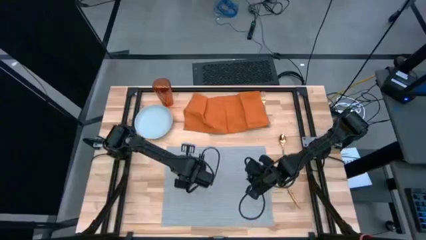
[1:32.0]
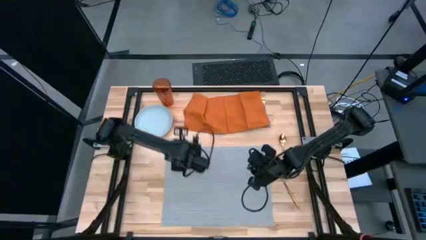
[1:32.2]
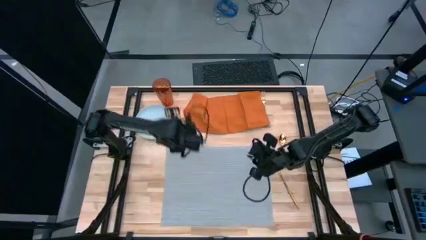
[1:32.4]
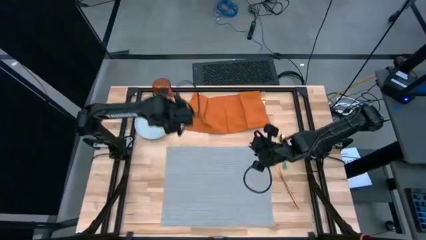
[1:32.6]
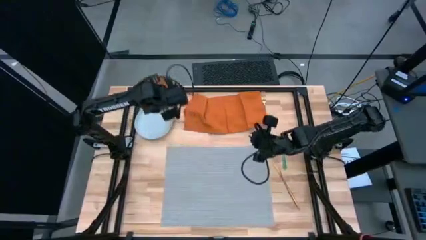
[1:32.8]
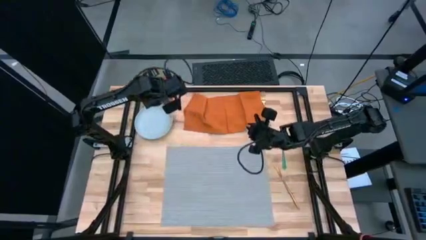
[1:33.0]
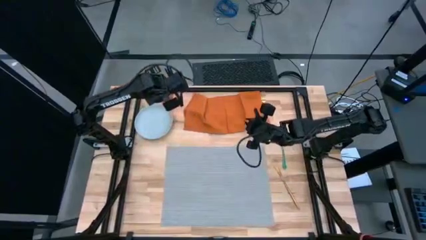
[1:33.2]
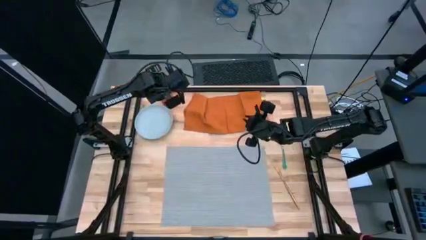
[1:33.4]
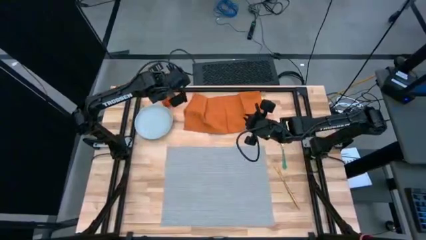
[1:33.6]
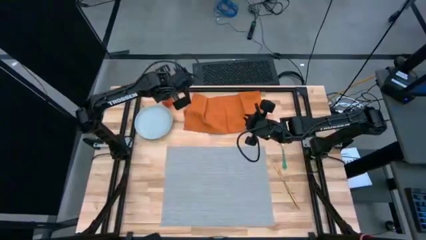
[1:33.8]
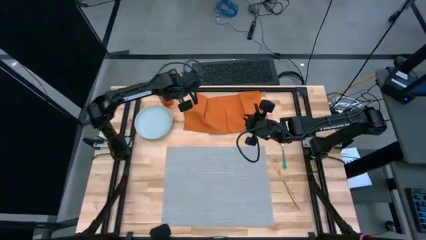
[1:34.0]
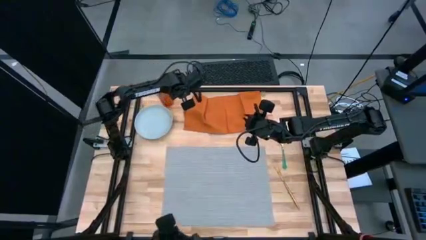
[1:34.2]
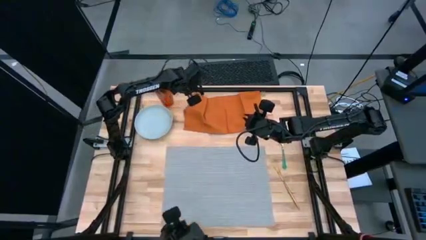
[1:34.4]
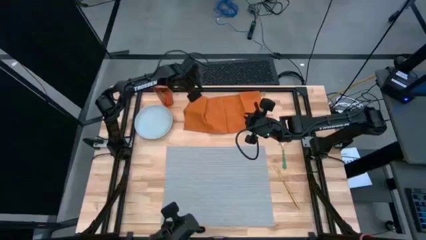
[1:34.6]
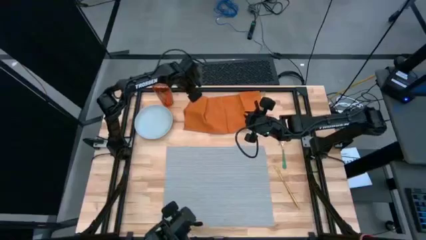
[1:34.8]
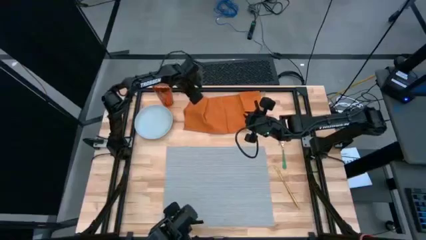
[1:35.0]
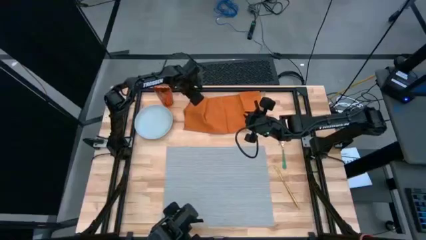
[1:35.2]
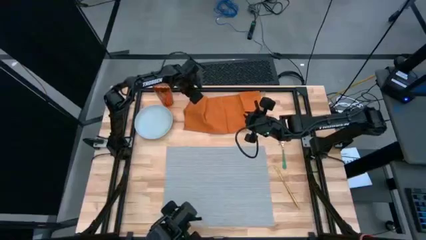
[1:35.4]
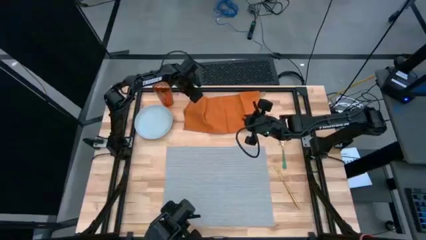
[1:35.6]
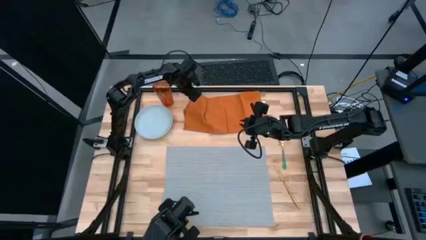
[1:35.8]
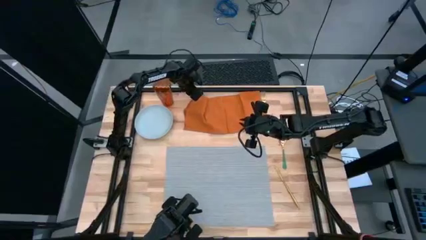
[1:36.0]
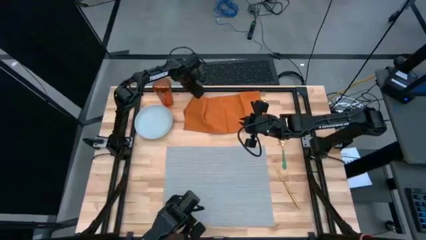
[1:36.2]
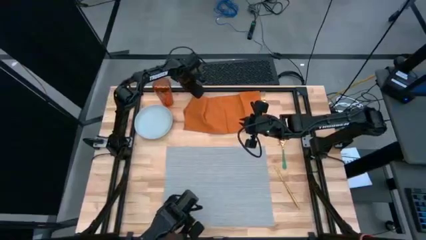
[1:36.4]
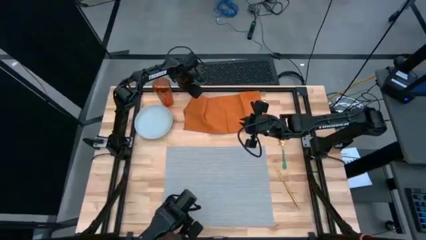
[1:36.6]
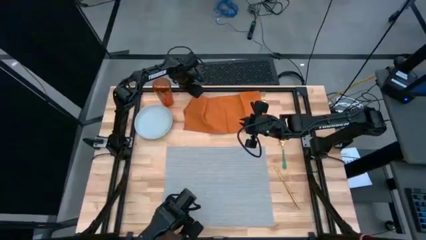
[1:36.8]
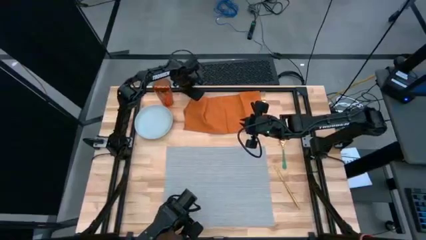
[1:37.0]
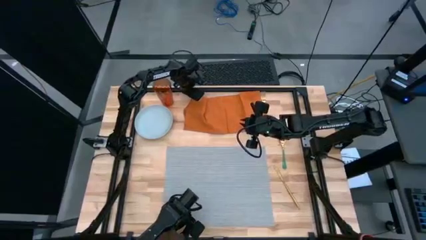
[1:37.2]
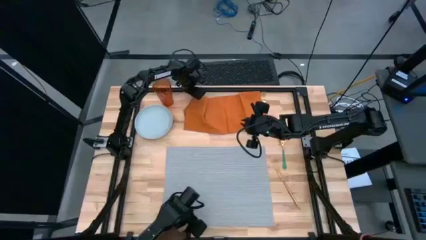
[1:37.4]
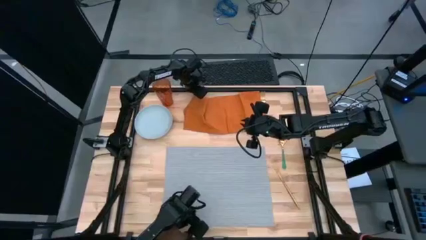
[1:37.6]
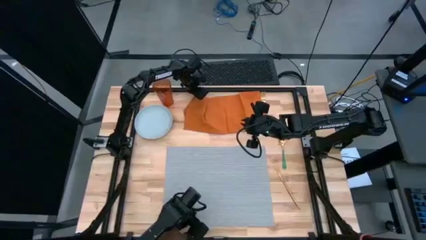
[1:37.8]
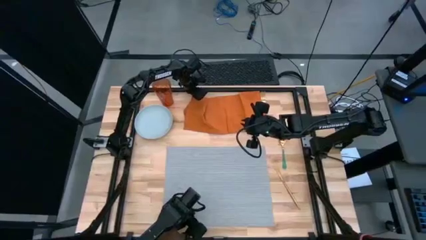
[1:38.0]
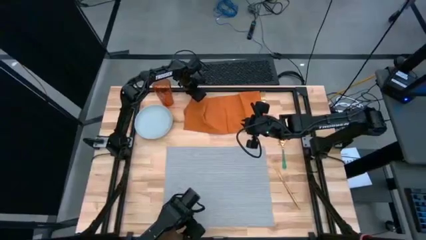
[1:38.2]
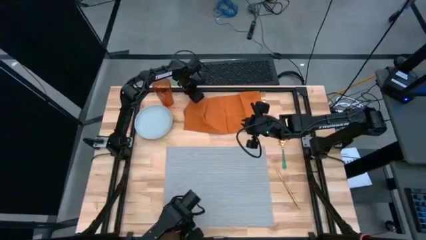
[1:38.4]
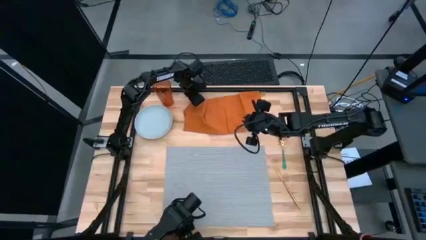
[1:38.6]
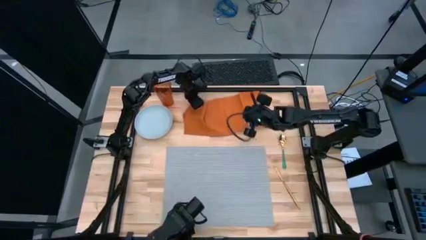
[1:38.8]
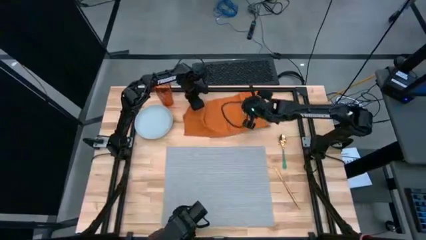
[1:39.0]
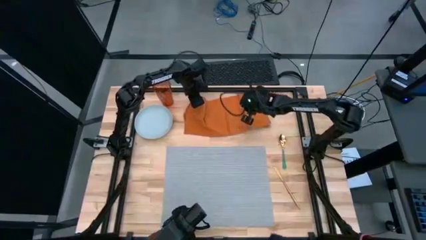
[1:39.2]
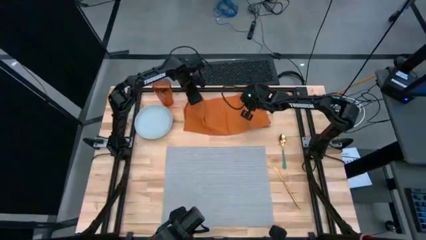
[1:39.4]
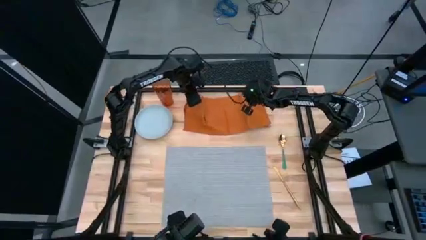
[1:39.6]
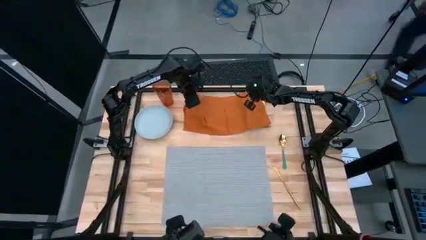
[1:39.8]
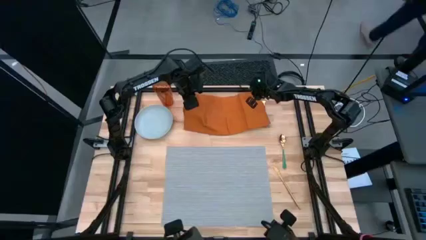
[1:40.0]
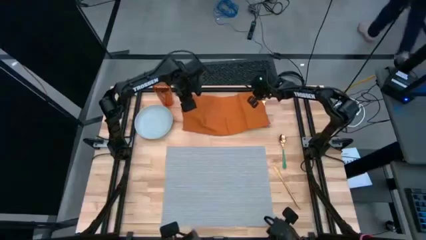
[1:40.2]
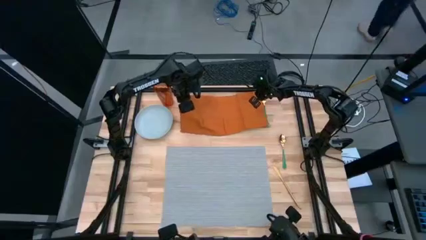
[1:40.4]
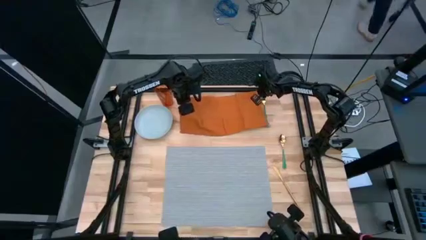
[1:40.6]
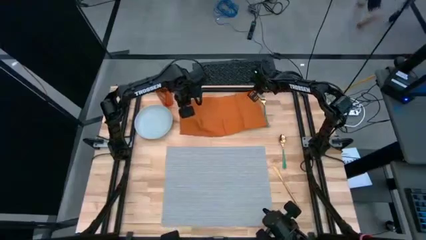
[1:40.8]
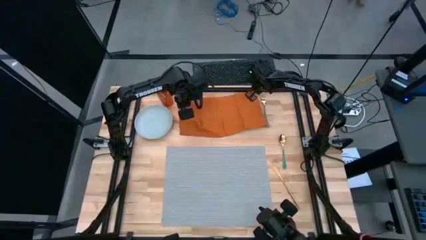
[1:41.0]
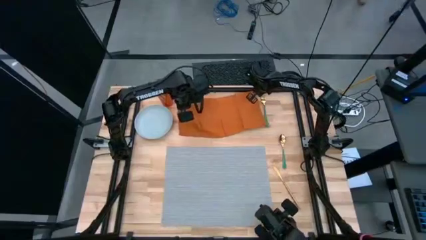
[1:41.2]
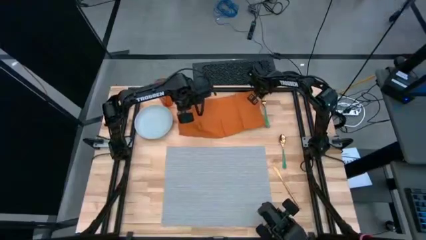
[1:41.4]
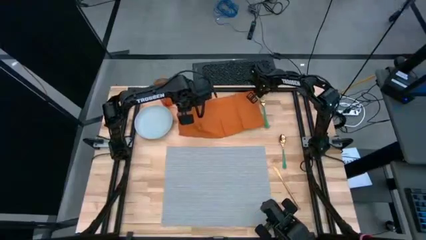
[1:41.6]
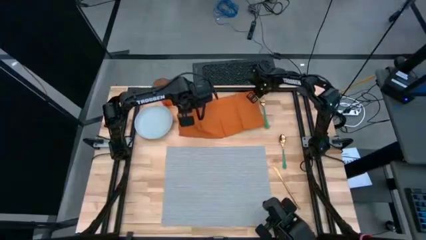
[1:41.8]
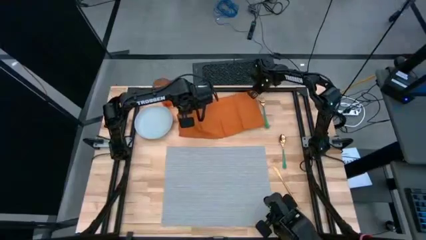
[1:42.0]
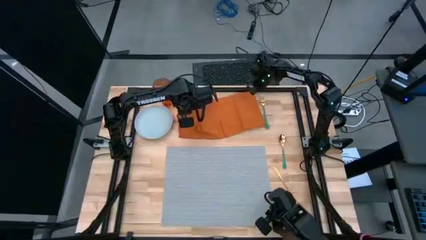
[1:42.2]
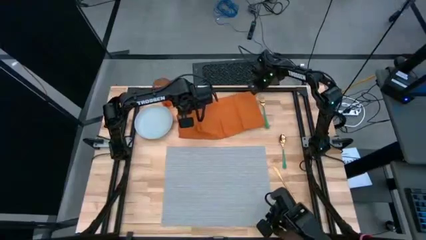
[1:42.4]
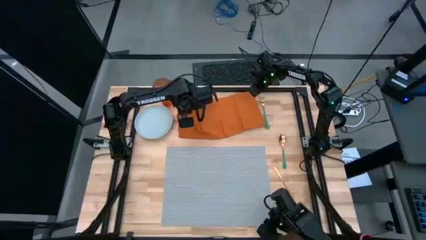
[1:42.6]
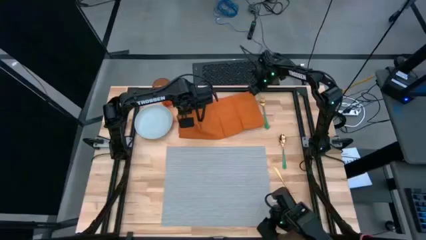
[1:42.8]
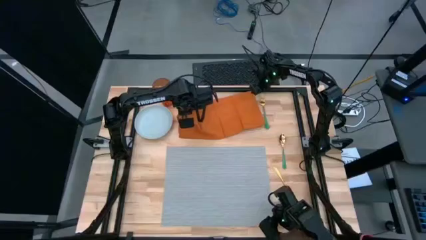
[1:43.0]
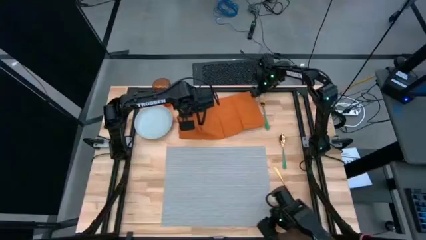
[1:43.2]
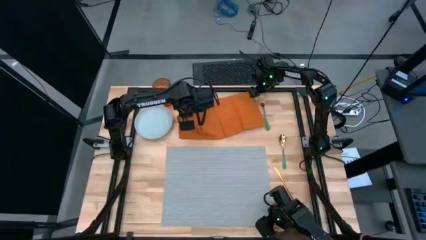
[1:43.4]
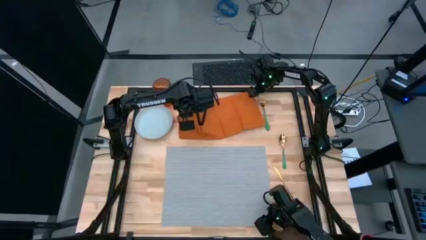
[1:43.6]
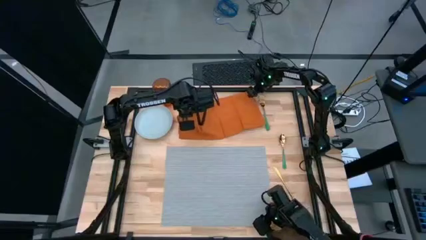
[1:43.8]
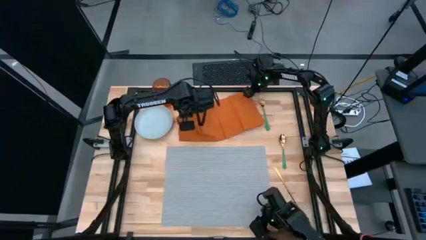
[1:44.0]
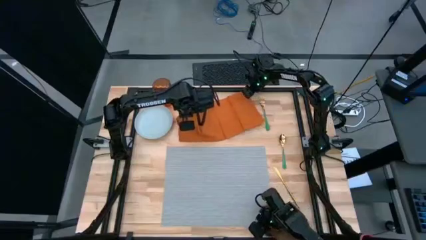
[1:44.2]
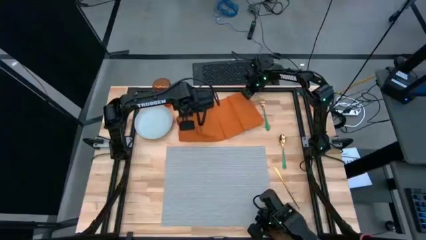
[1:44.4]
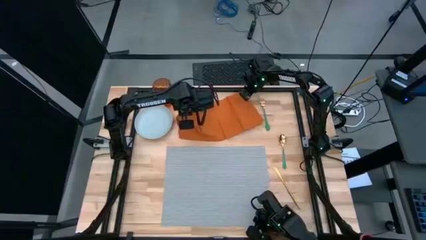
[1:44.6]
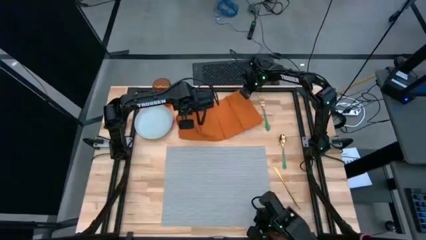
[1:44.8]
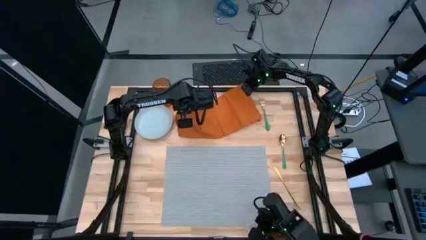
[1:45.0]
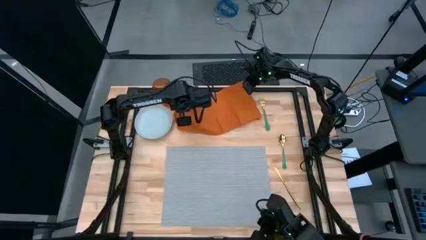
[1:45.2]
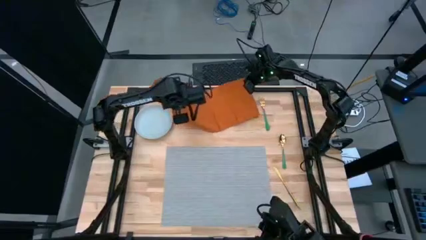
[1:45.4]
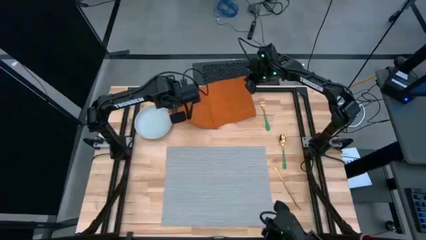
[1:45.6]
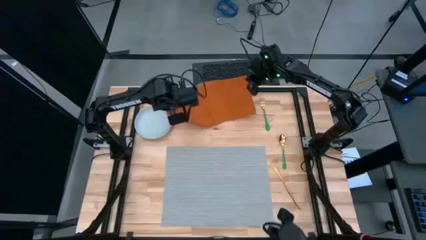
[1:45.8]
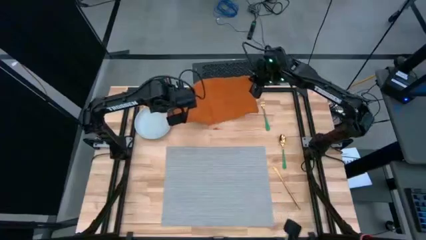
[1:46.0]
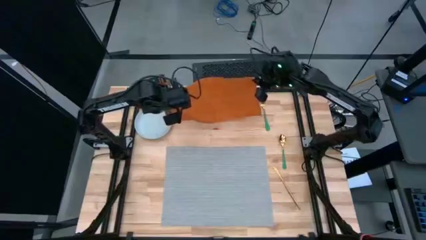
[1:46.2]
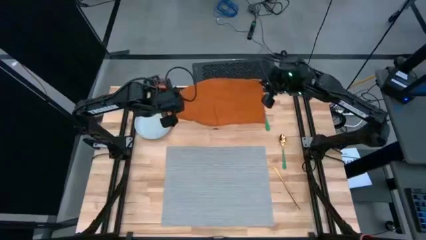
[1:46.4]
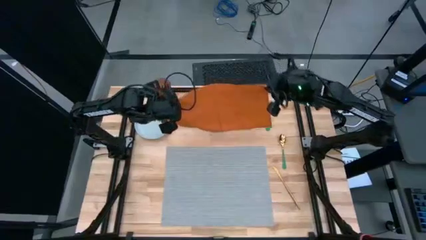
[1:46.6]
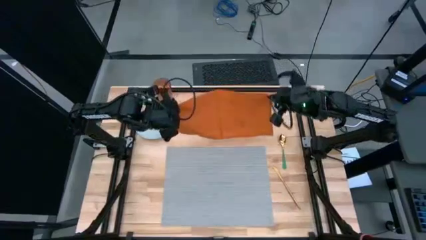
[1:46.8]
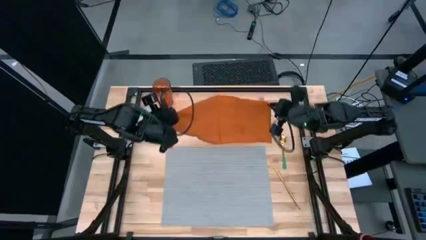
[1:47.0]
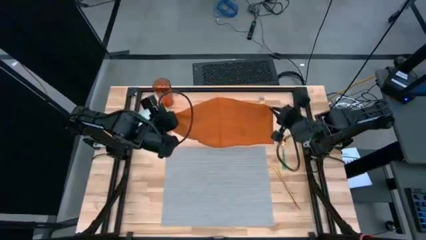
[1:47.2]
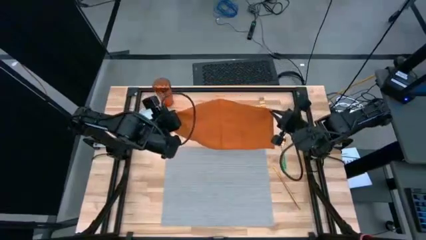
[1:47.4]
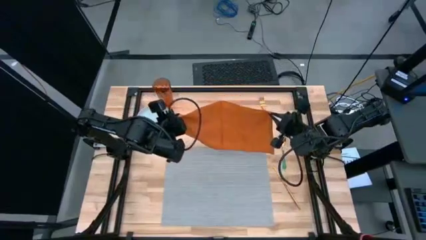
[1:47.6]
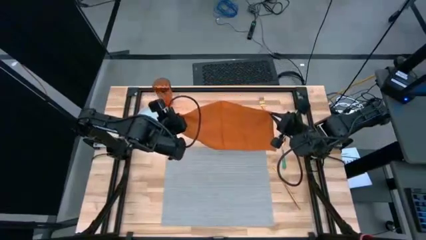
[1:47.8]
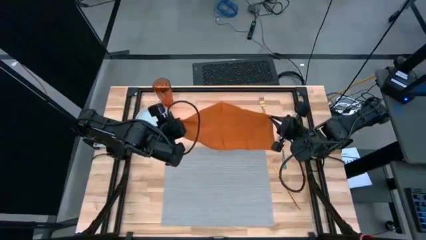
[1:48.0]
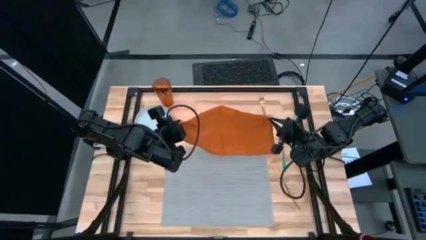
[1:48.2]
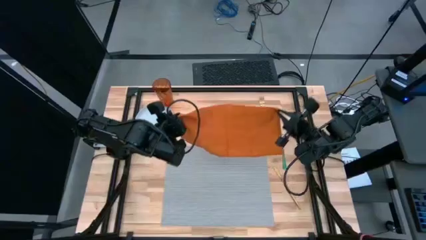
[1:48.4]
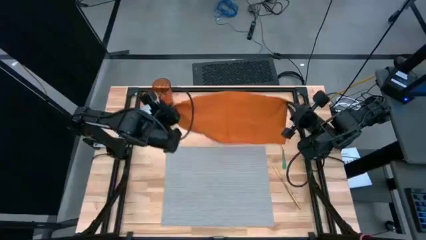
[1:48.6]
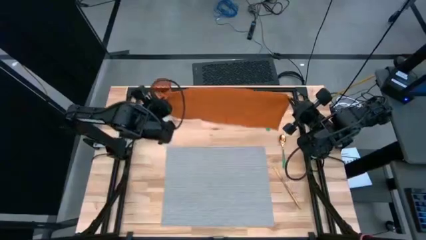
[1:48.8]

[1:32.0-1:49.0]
Task: Set table place
Fold the orange napkin

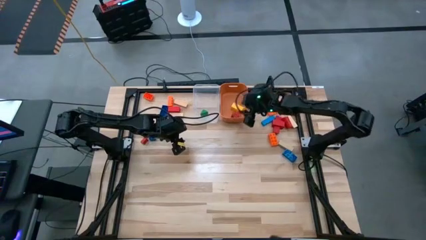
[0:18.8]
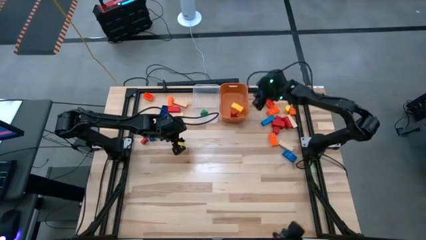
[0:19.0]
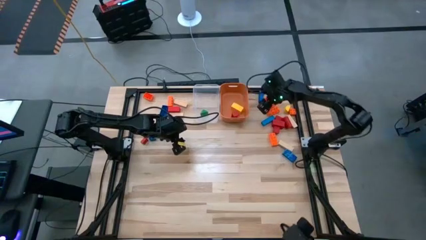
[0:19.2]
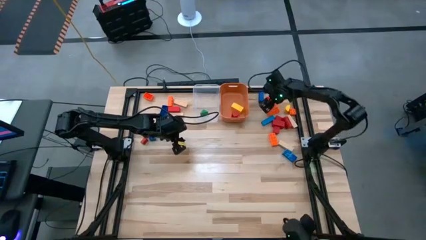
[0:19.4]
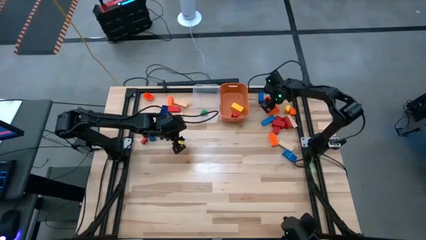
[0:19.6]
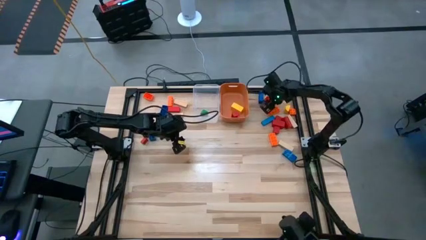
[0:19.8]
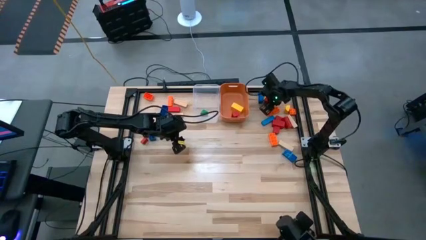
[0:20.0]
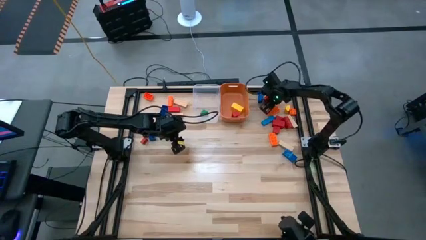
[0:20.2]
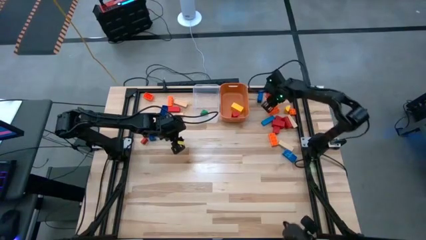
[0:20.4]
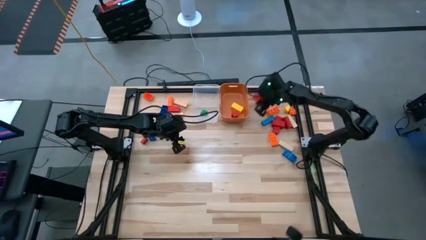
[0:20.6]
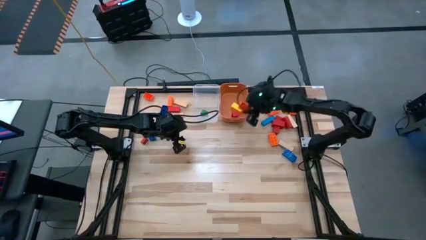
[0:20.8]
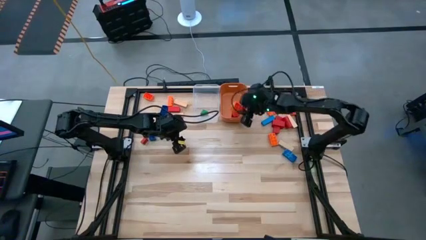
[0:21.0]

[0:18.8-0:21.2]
Task: Sort blocks by size
Put the orange rectangle game piece into the orange bin
